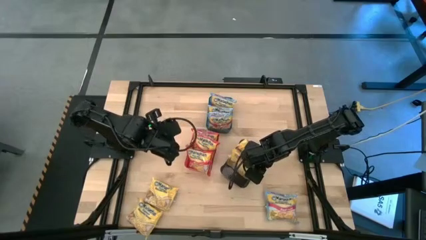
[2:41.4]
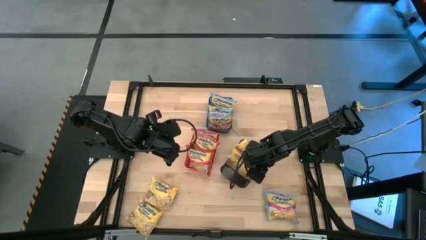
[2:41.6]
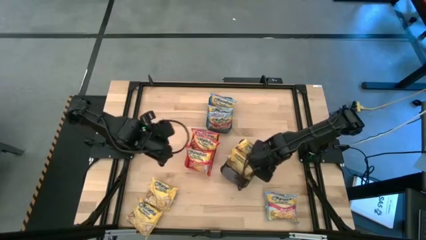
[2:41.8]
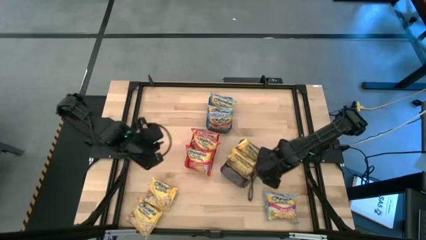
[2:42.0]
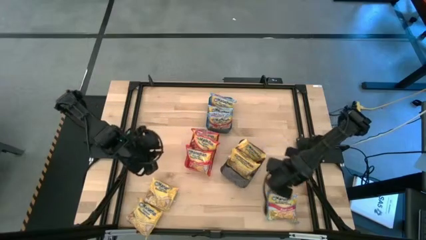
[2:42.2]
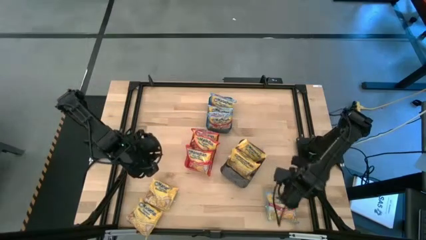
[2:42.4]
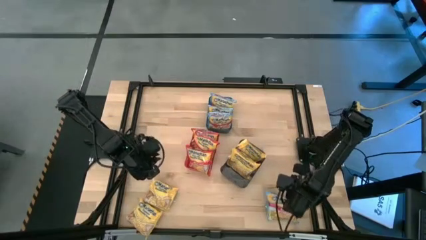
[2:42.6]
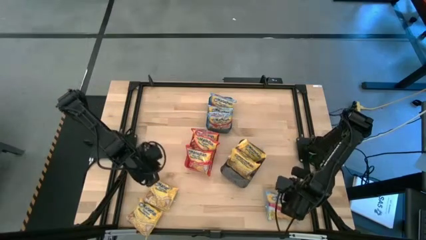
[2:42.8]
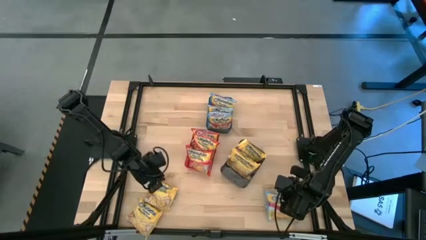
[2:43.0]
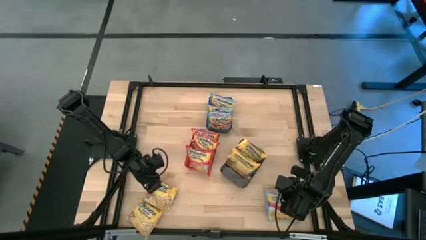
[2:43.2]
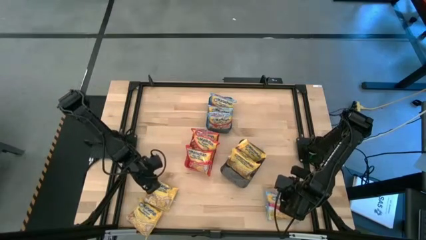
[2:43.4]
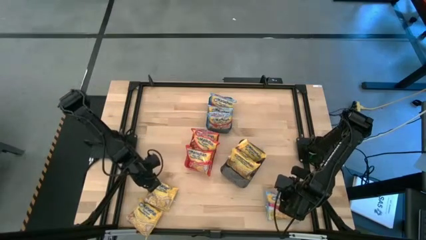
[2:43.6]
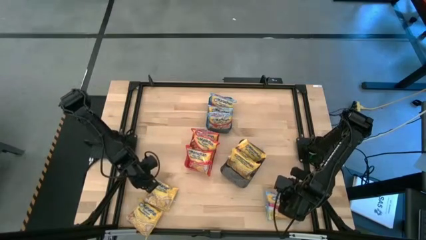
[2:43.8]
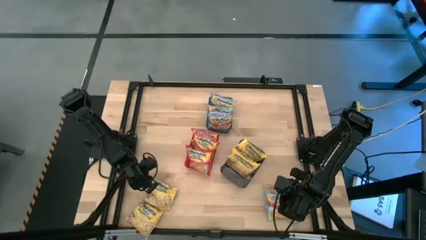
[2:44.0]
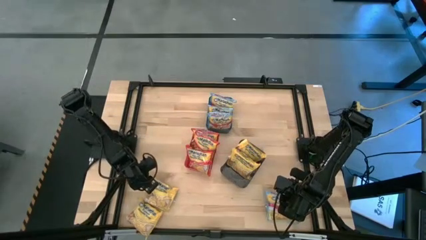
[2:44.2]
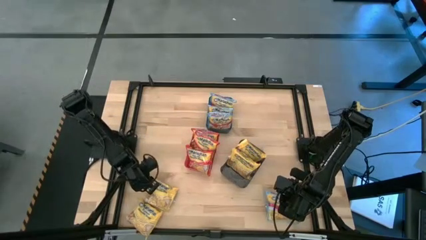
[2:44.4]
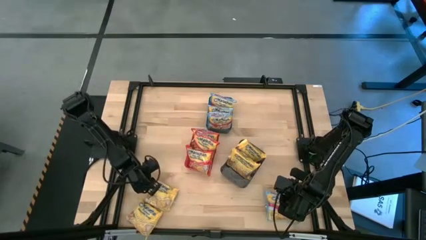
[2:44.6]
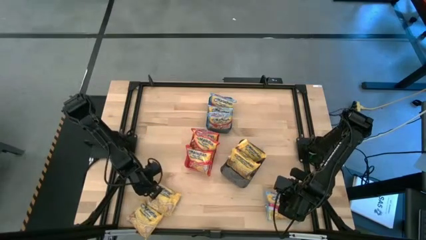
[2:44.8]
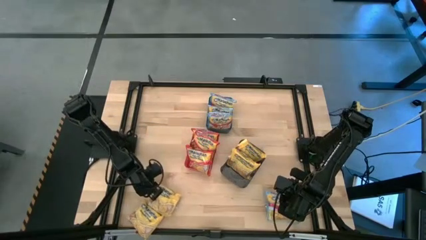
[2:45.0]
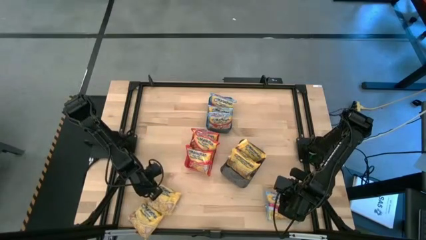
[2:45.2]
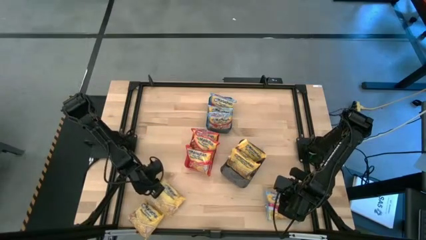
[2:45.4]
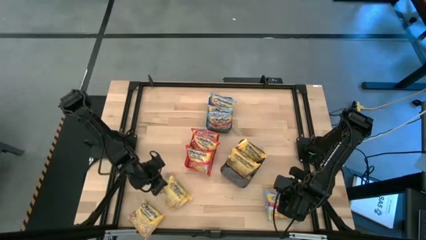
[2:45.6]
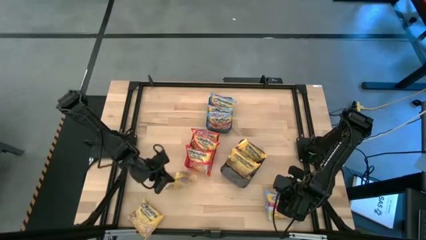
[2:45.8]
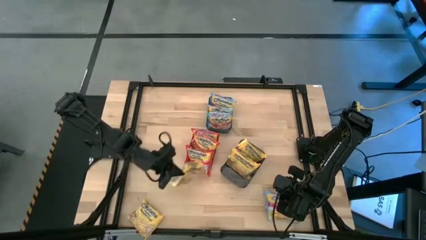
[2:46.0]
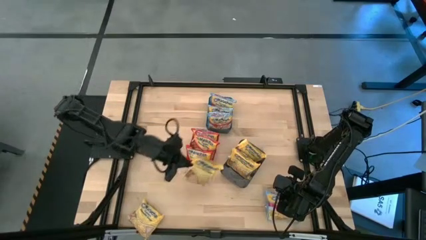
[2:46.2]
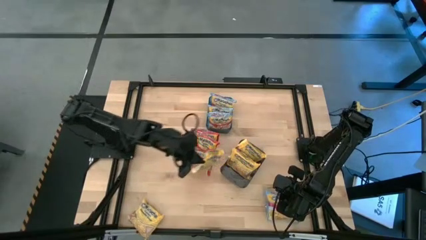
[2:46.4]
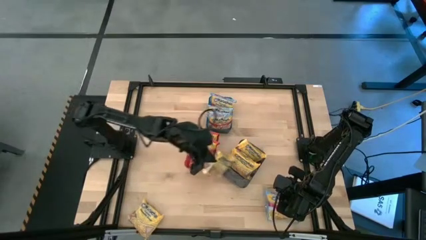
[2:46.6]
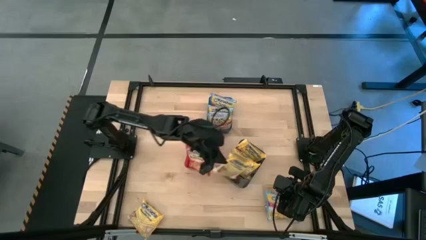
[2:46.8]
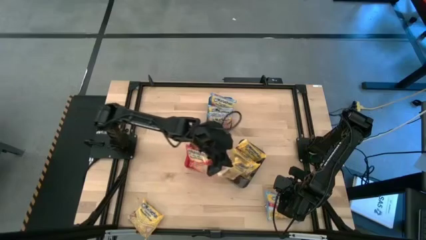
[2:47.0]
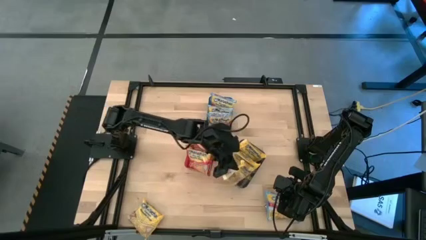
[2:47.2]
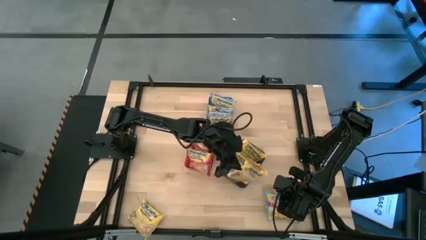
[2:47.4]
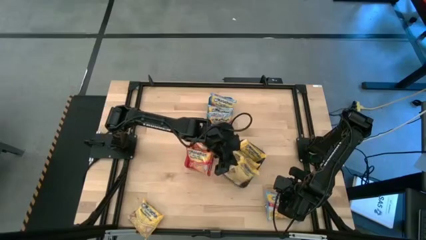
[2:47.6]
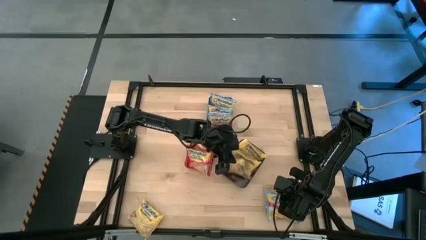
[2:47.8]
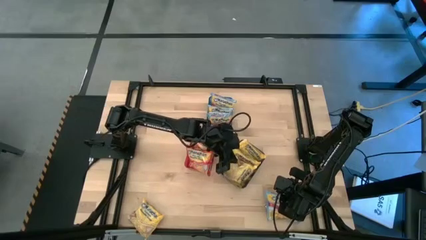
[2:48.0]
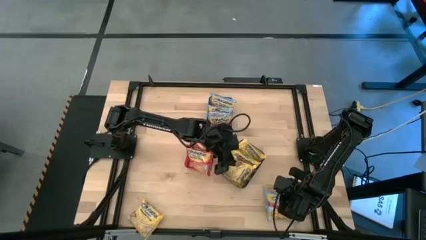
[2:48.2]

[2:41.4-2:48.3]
Task: Sort Maruchan noodles
Put the yellow bag into the black bin

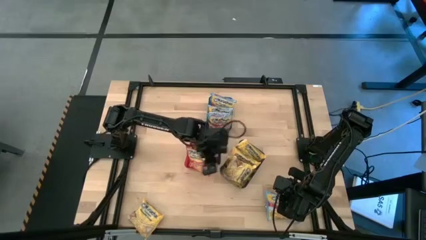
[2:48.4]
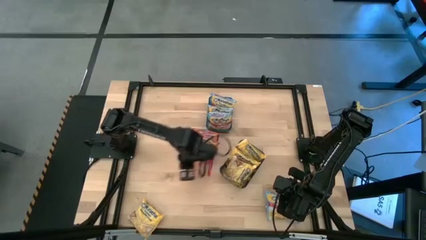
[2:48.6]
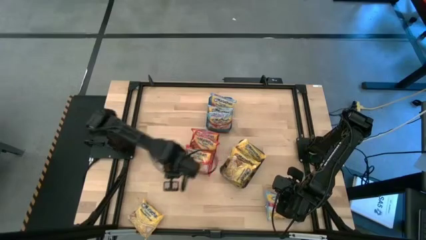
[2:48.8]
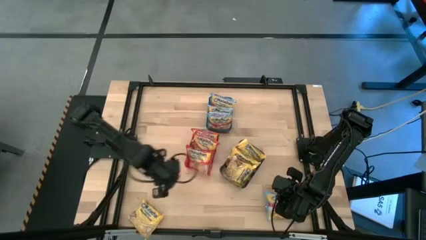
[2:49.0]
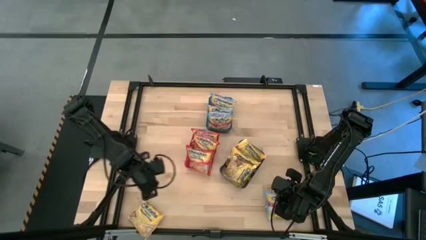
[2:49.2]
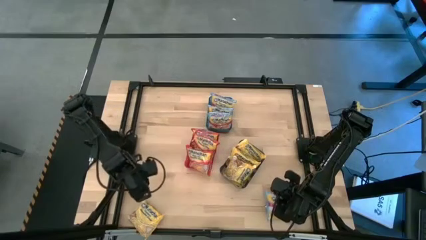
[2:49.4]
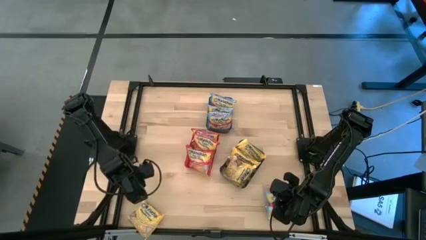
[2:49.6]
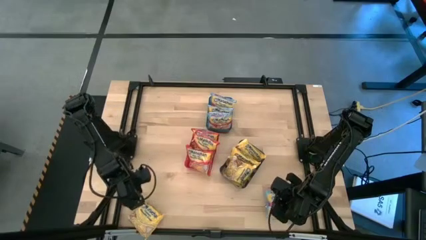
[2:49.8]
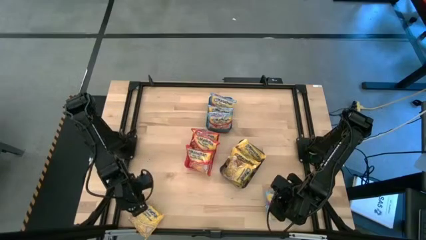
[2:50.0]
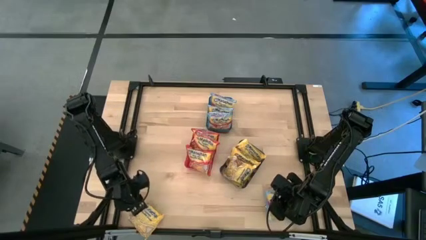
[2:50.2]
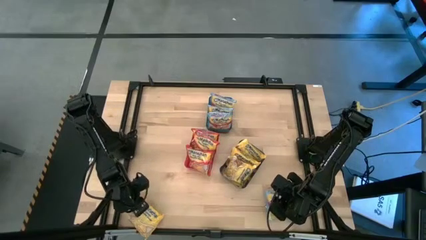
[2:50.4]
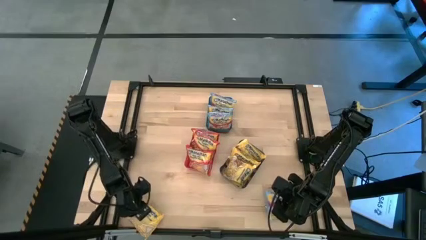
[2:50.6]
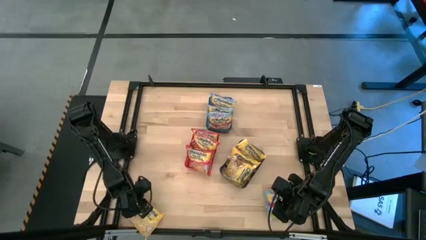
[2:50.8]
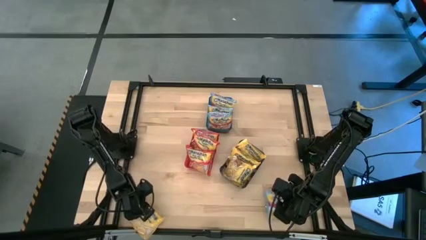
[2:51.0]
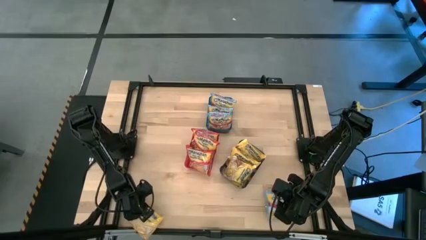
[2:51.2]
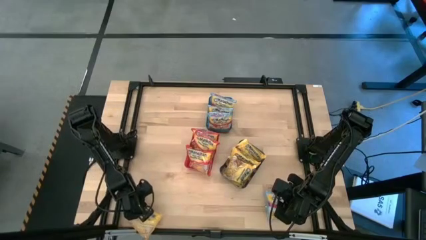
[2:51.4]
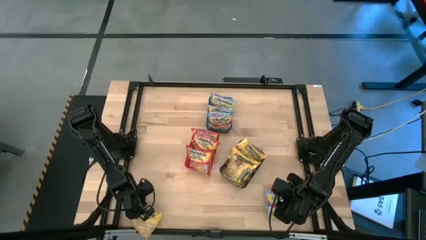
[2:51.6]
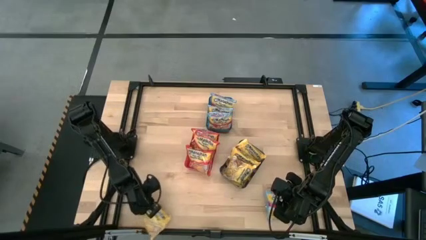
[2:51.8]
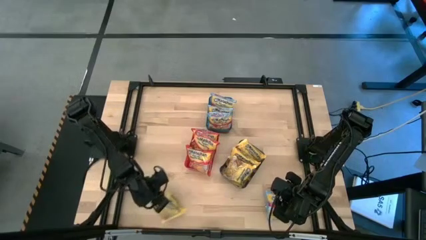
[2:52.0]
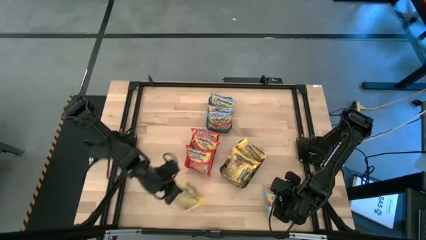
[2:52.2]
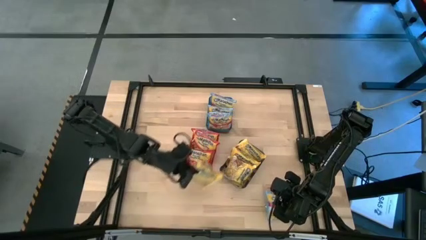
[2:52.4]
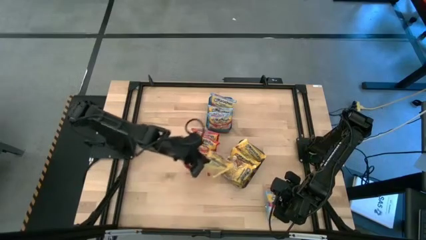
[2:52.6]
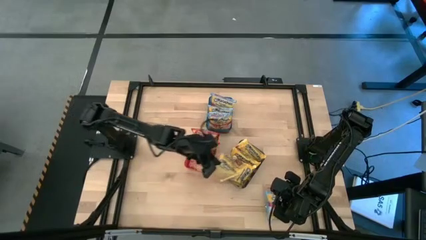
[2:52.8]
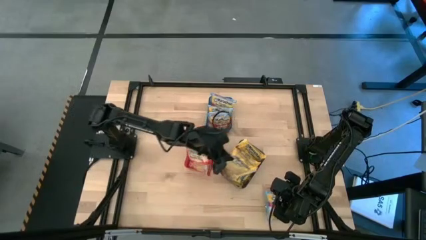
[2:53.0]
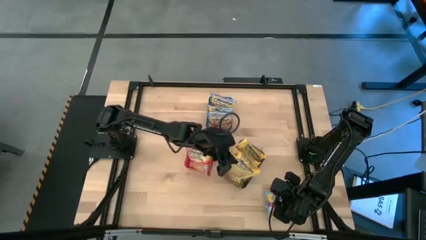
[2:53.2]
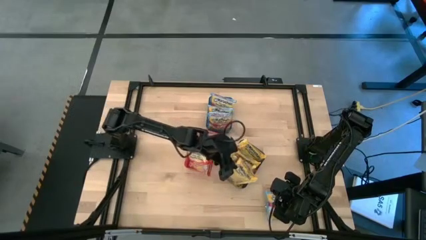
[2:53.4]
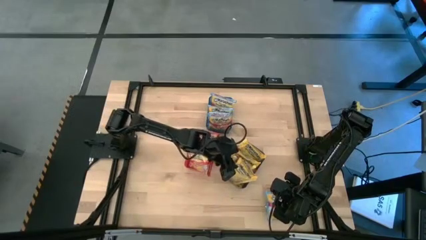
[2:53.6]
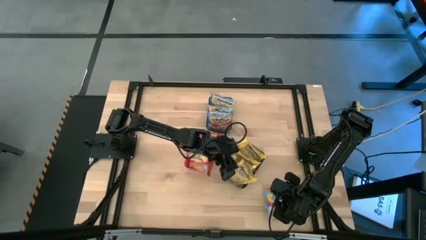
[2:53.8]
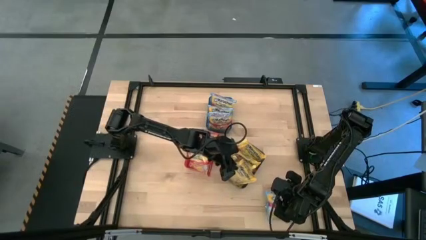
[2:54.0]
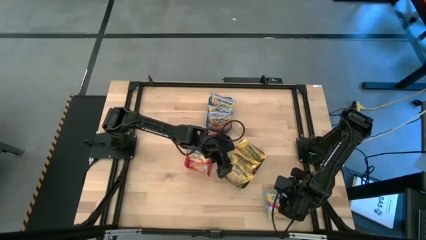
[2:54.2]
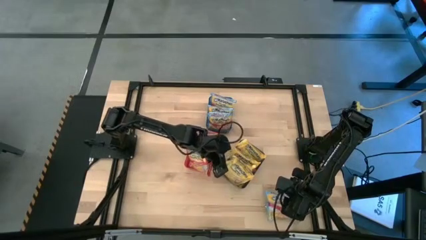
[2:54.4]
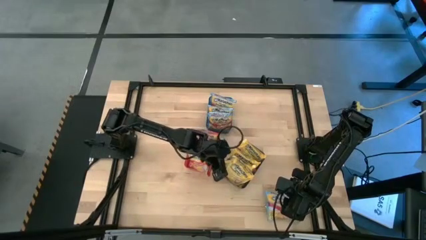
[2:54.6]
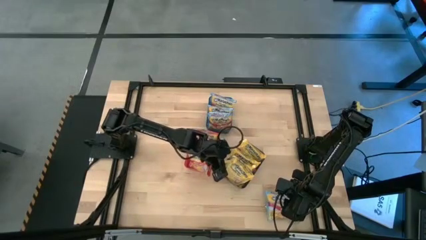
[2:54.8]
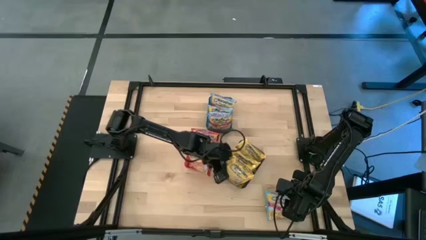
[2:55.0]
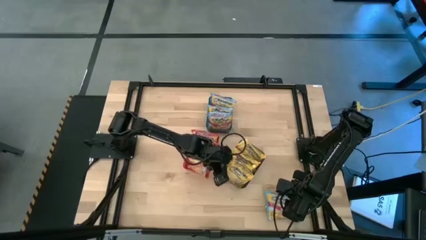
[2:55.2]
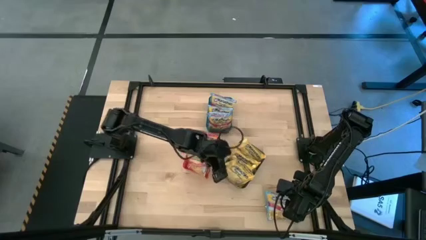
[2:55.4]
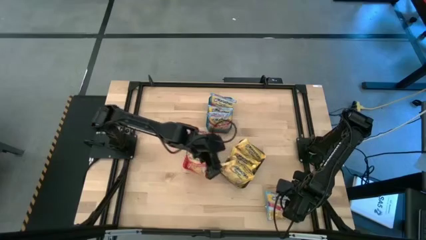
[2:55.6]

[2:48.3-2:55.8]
Put the yellow bag into the black bin
